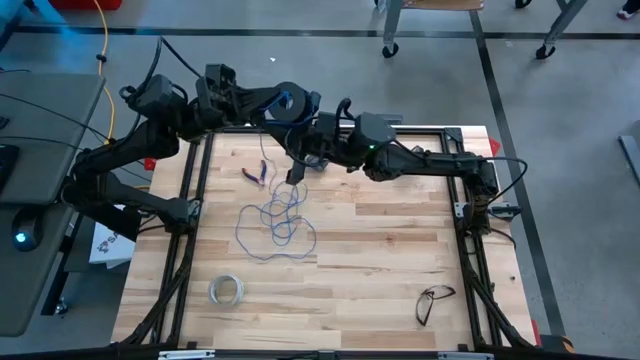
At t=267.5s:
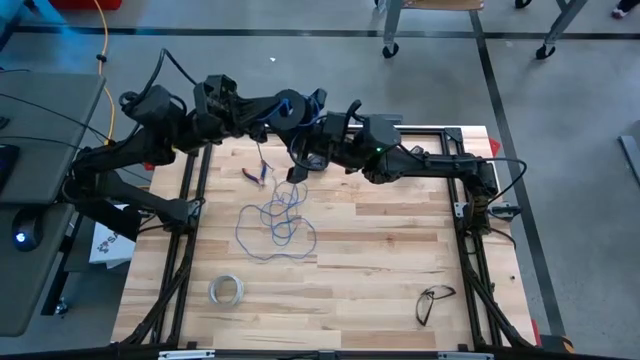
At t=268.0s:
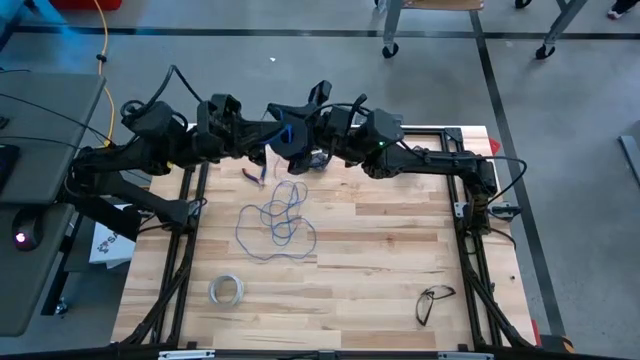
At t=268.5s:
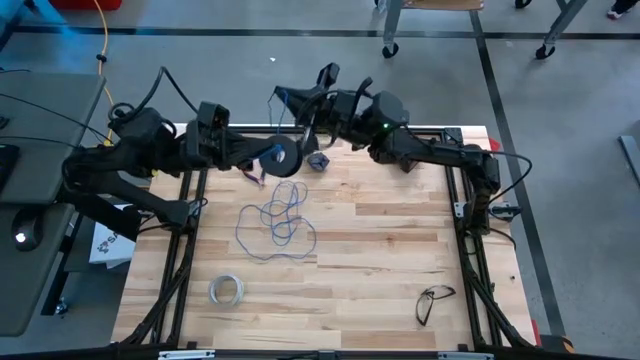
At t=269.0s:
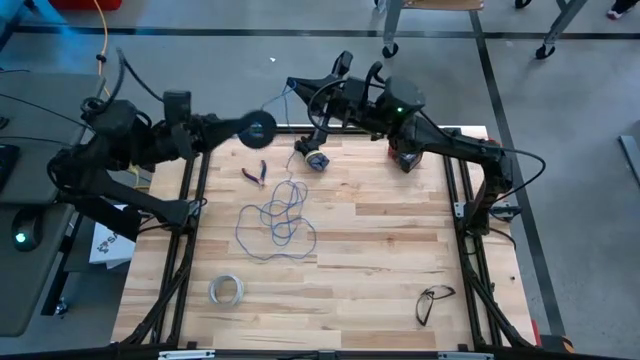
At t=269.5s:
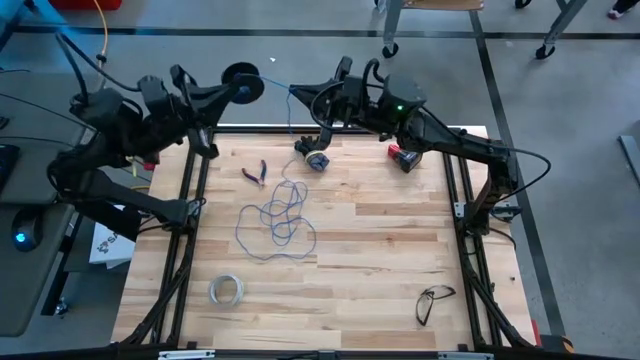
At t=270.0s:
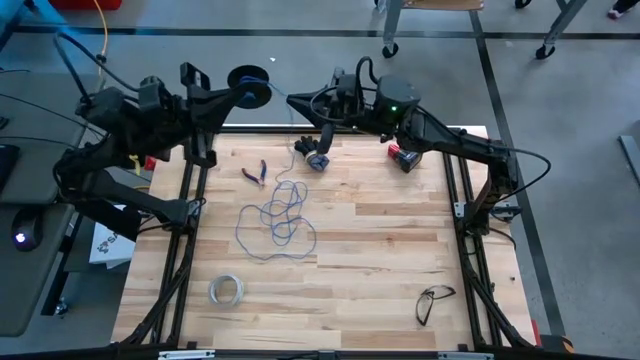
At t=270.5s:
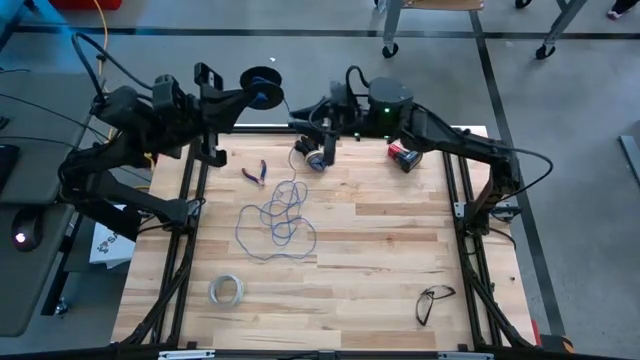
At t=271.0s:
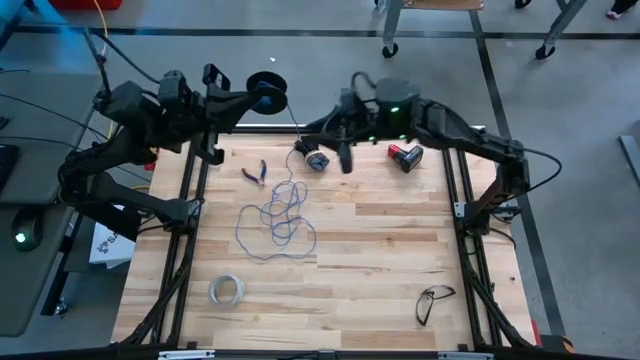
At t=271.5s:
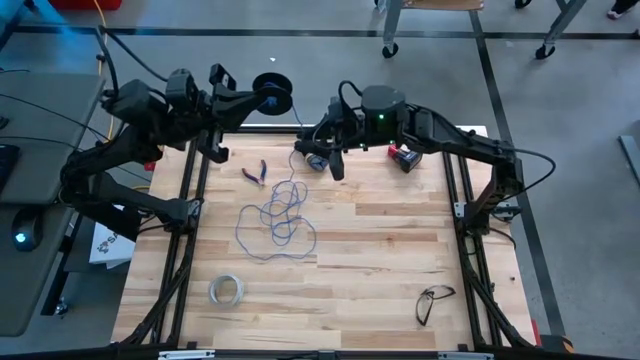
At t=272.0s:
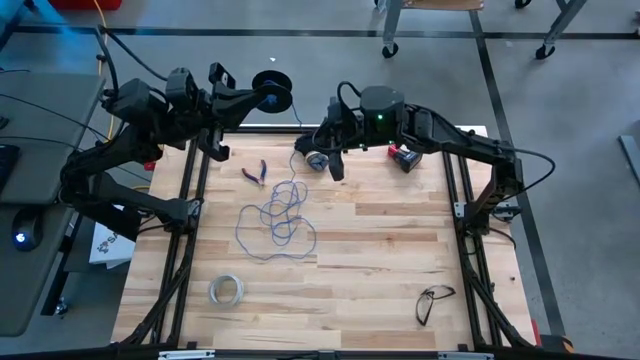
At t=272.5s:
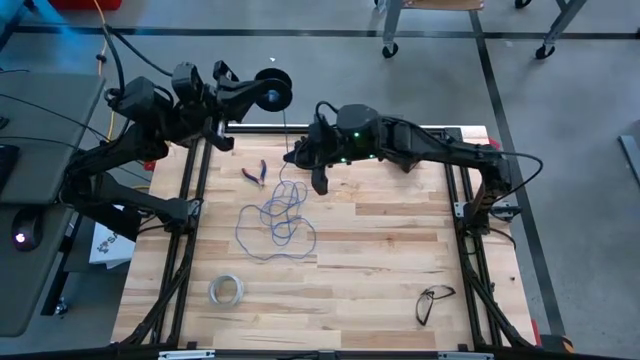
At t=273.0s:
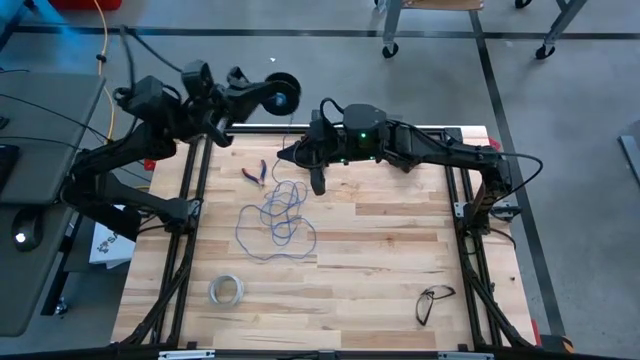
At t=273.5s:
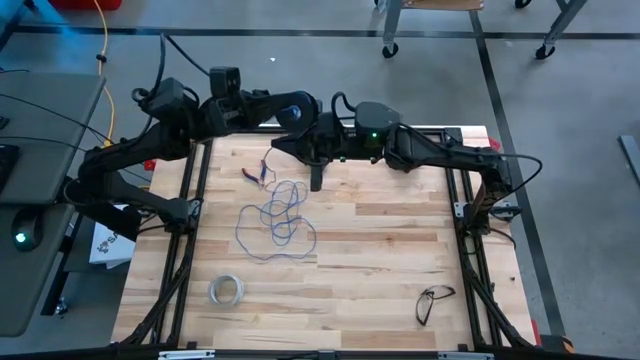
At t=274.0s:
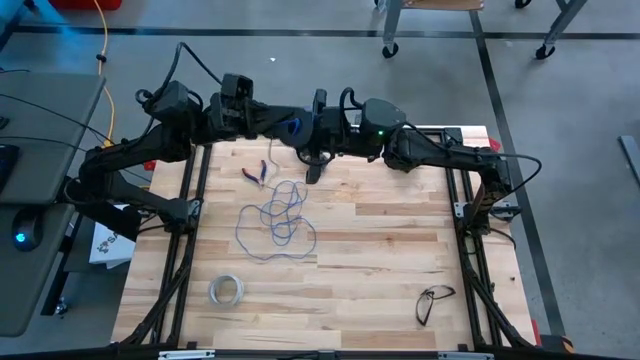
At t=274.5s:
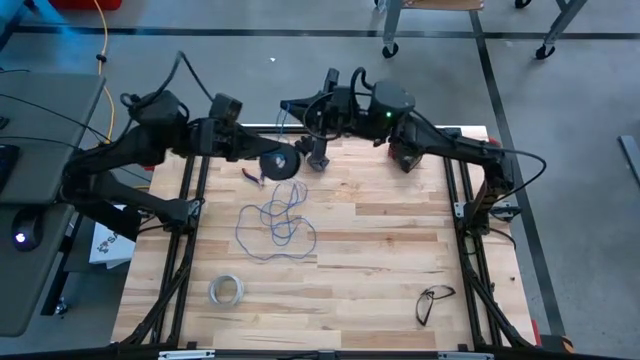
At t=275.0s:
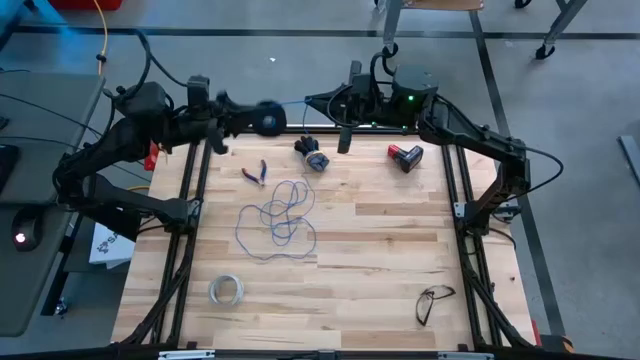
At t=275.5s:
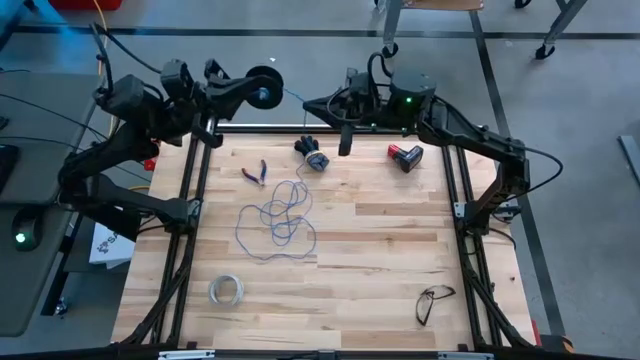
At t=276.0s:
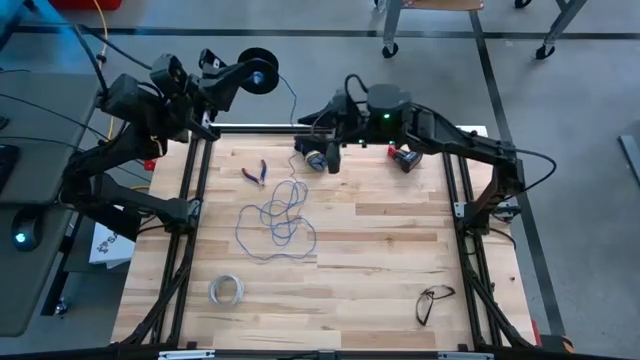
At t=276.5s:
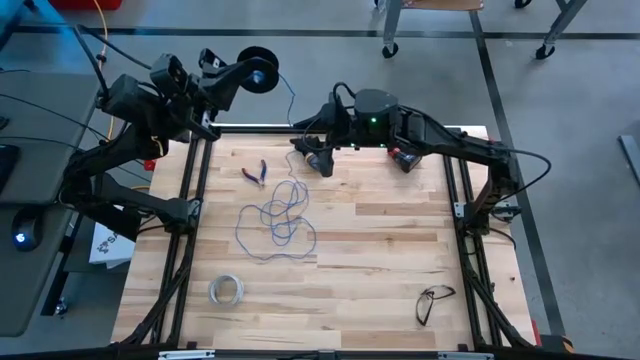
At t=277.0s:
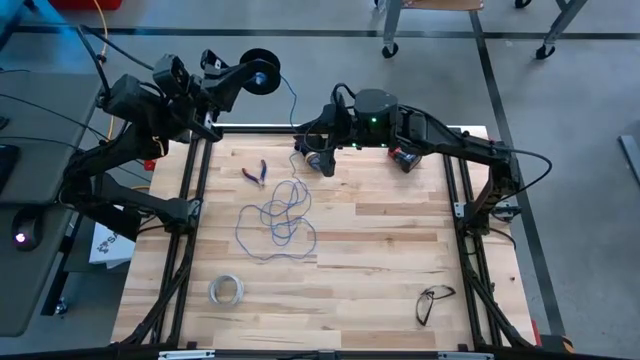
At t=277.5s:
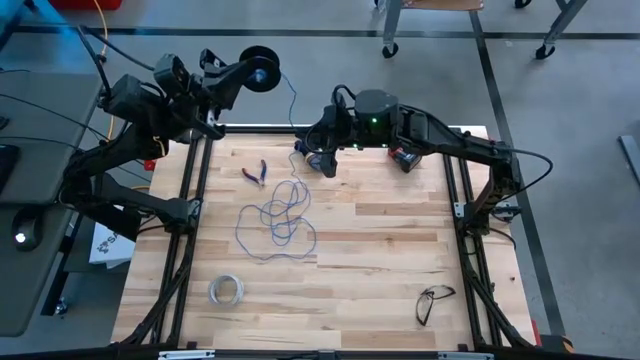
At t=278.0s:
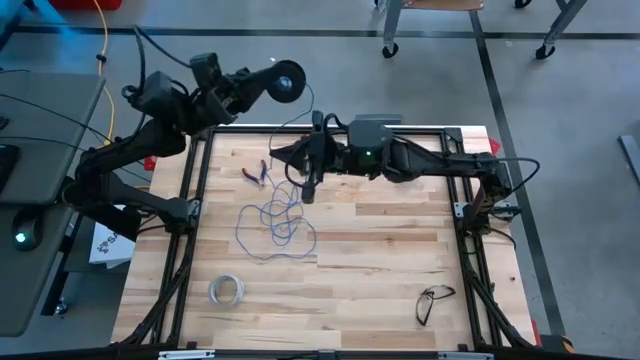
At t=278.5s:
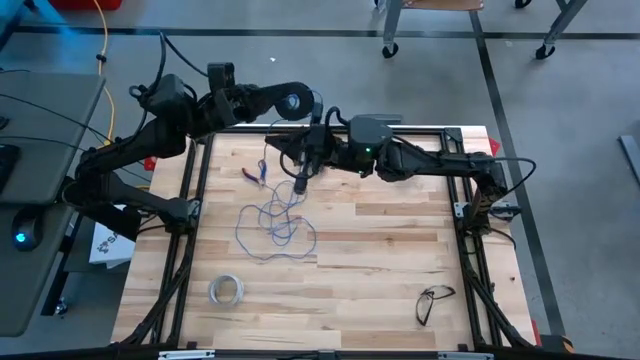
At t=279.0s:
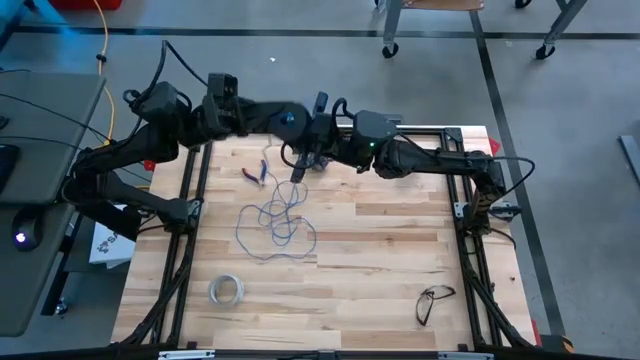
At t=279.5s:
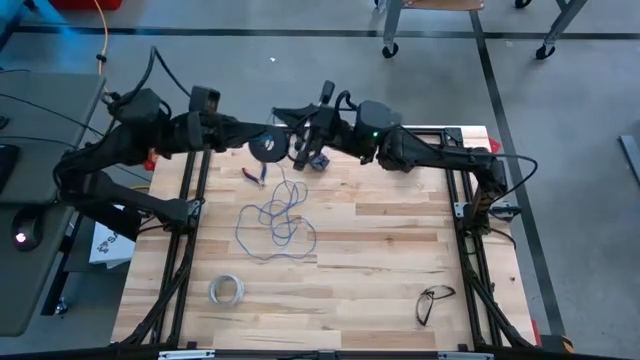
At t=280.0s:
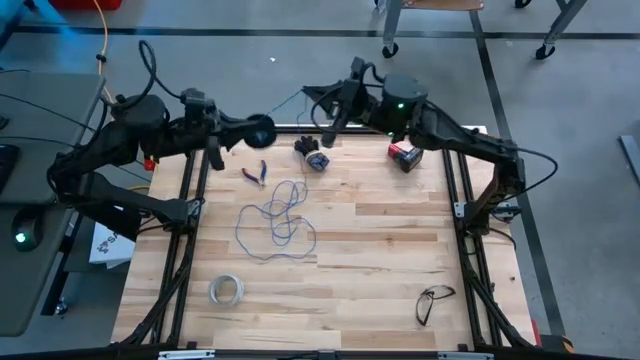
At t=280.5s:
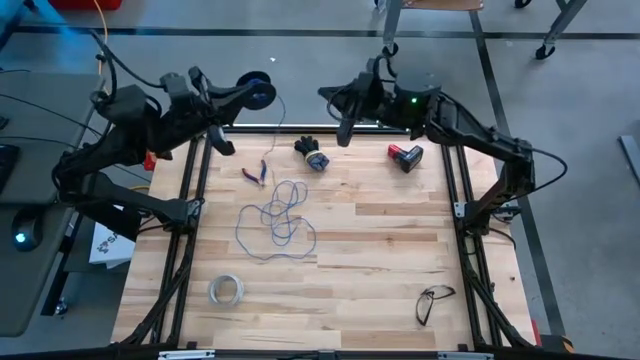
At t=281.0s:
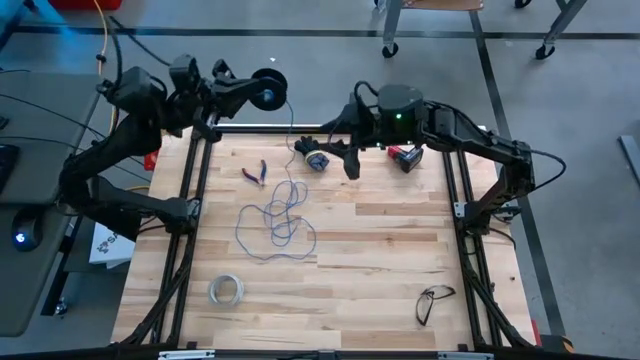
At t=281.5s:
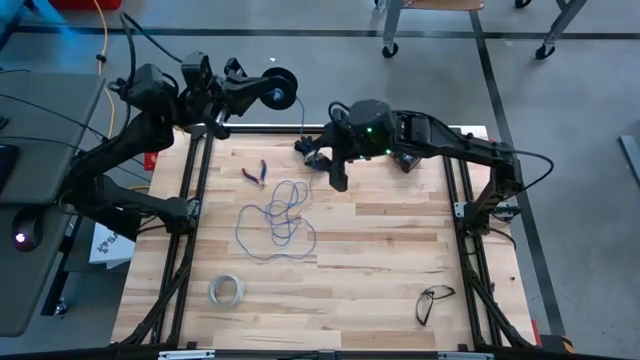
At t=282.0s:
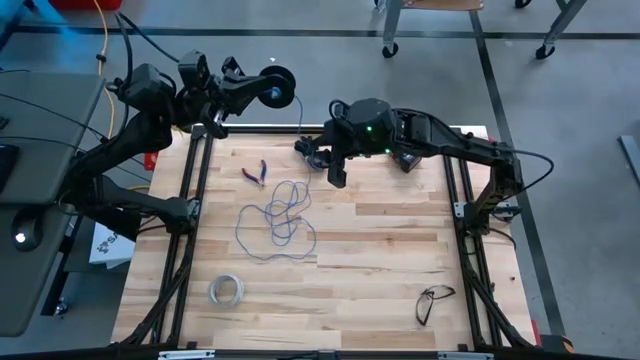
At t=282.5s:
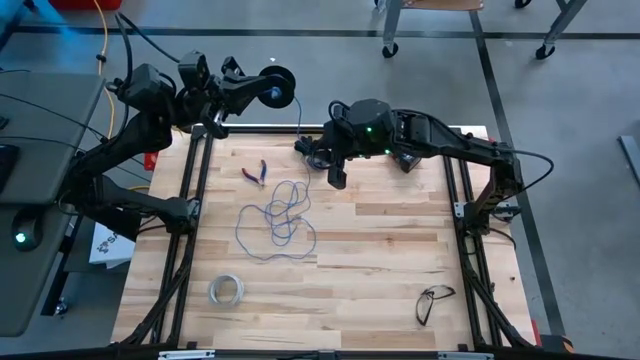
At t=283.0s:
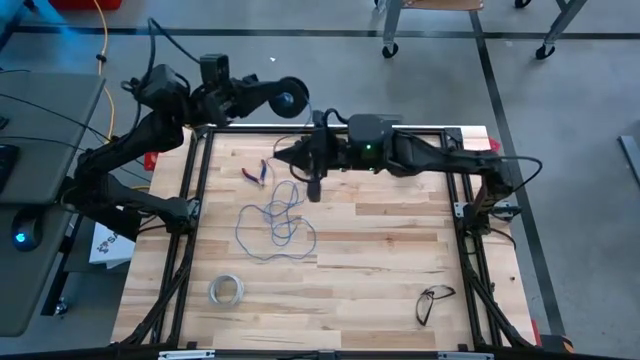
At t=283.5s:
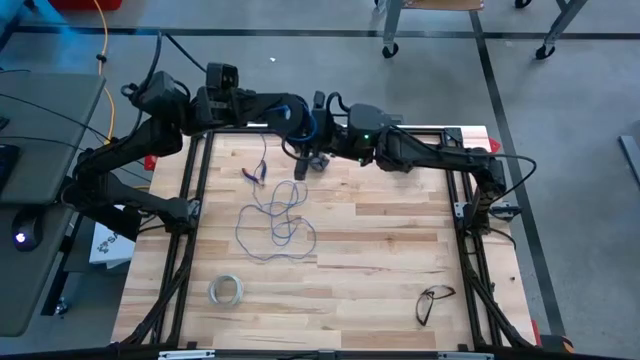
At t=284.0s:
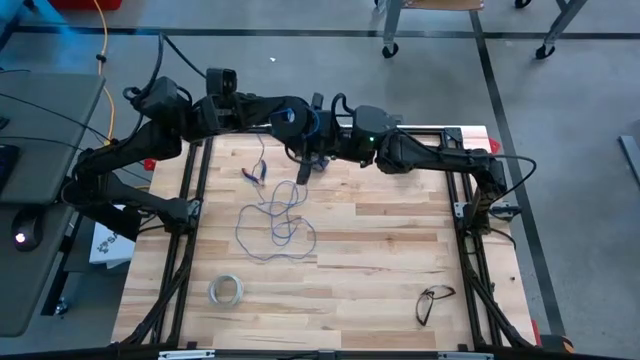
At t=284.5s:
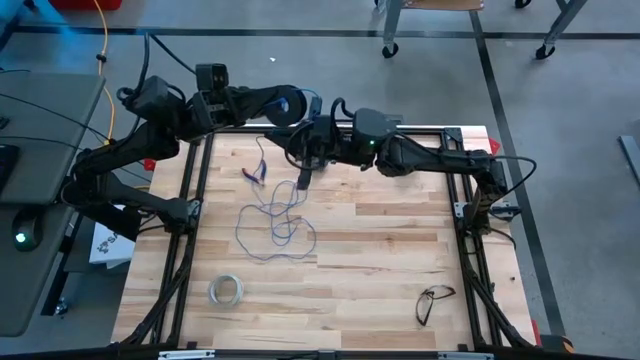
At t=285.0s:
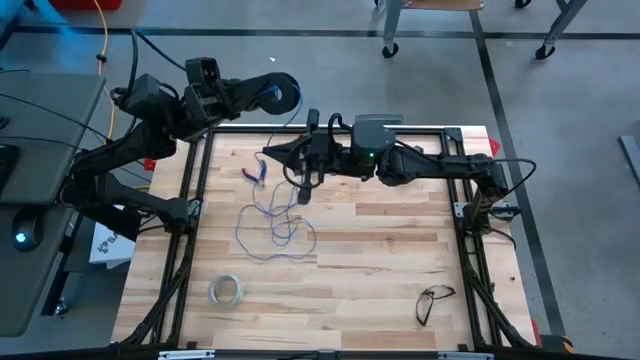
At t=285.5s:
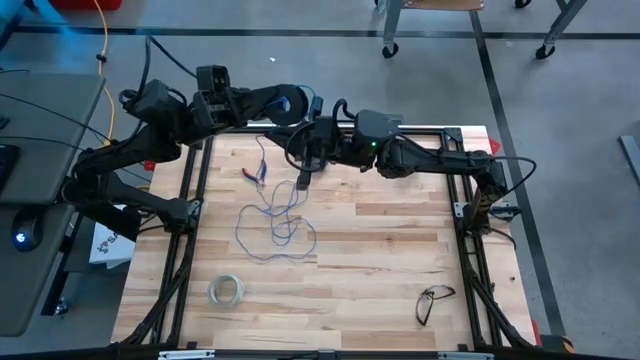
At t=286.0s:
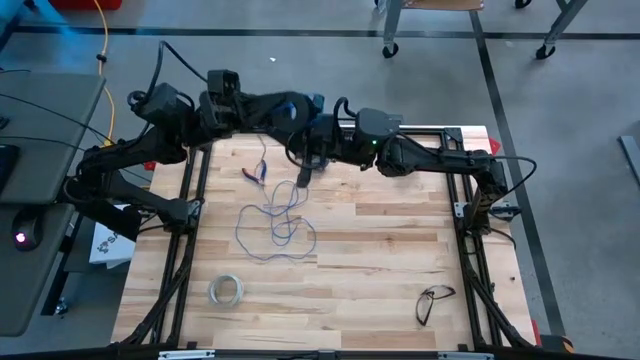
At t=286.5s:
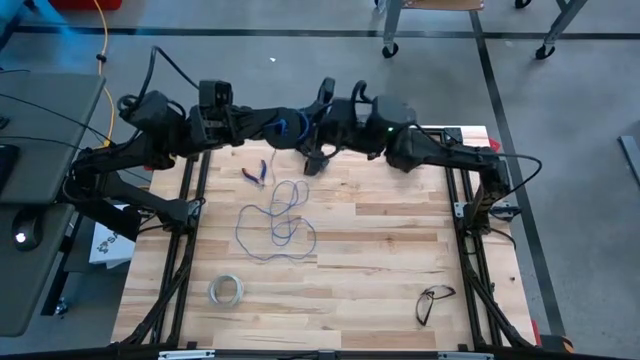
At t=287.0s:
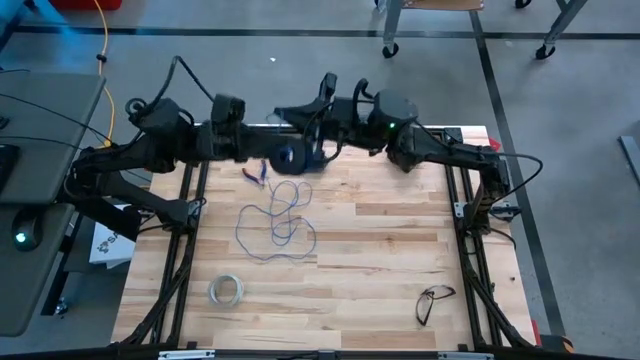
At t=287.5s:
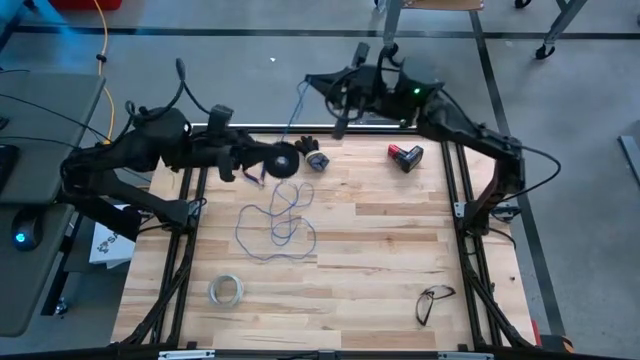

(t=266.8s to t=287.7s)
Task: Coil cords
Coil the blue wire onto the black spool
